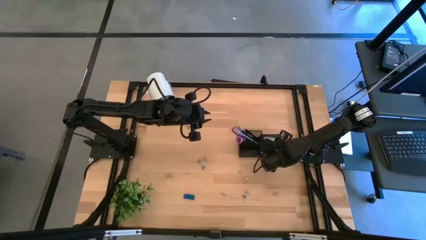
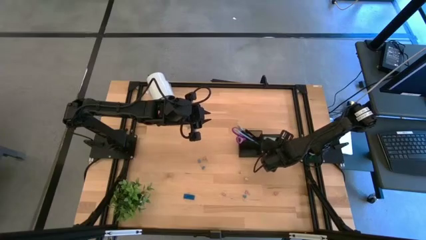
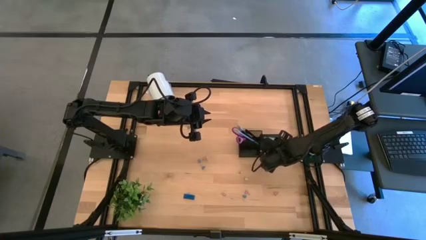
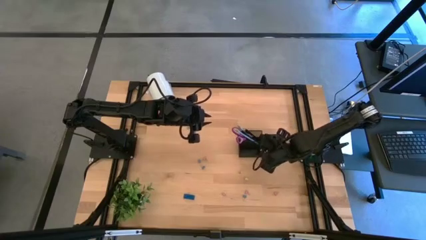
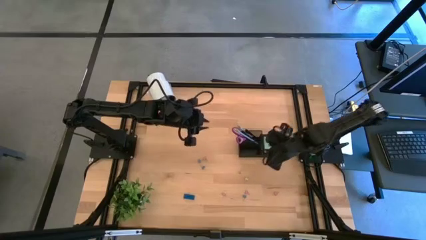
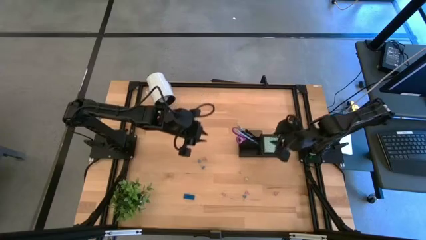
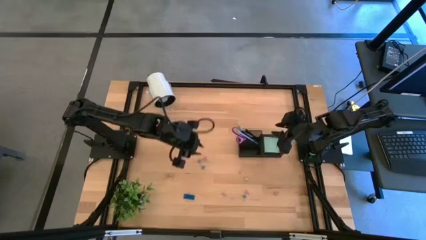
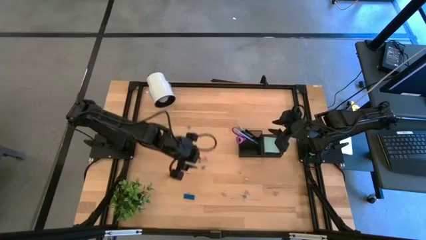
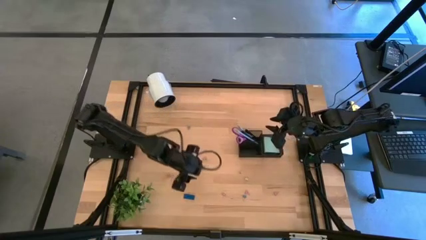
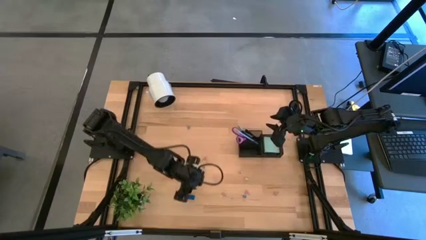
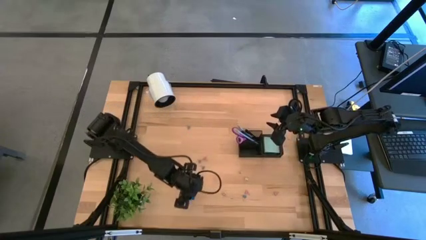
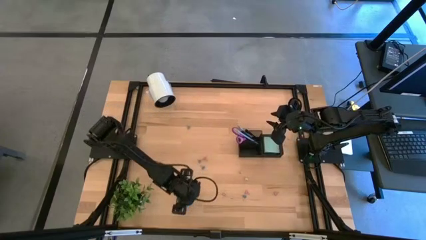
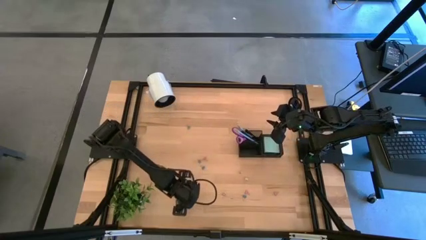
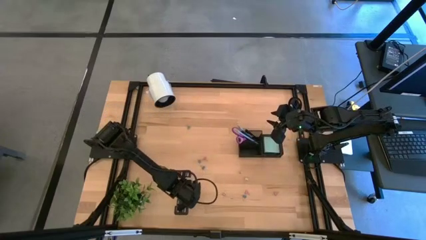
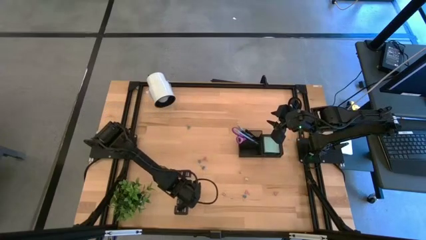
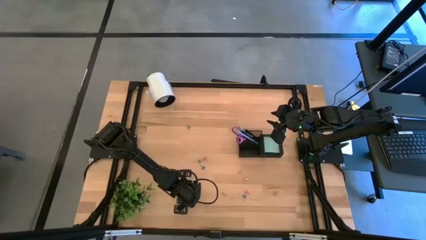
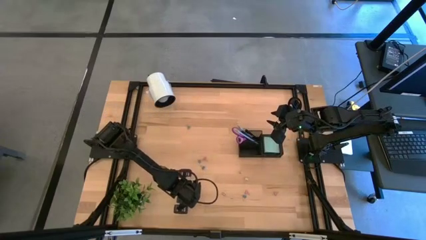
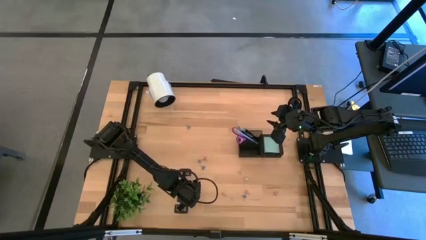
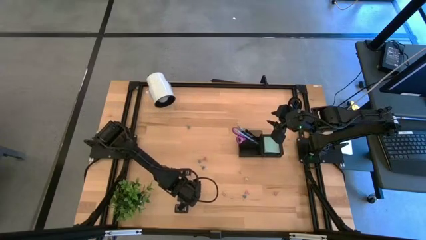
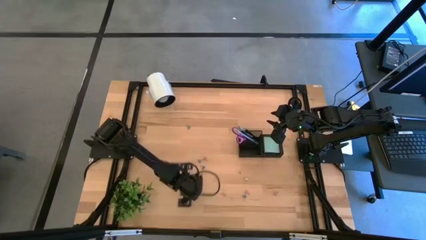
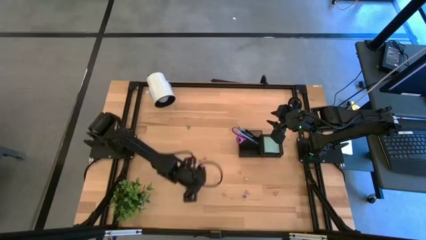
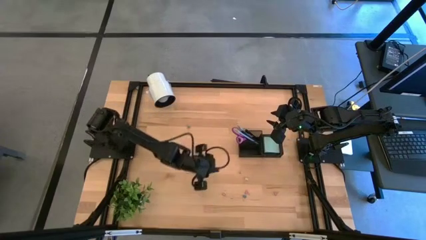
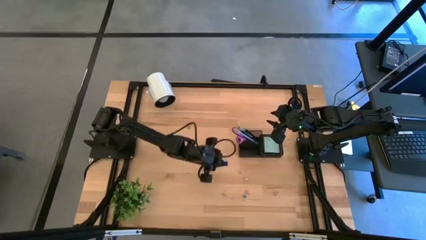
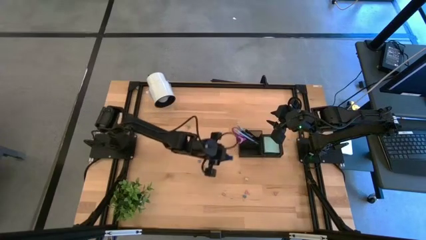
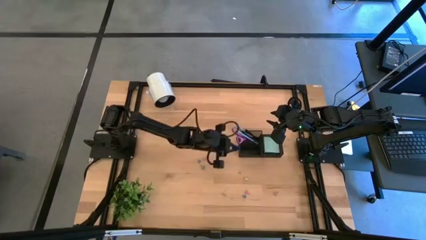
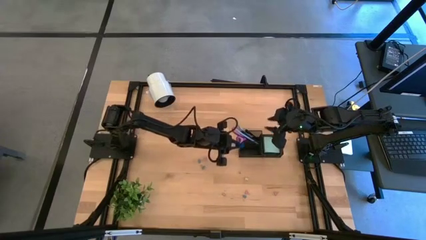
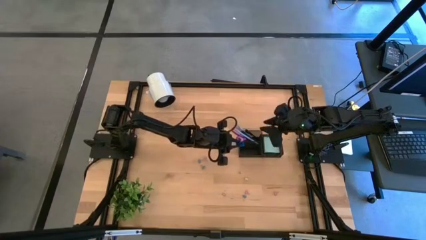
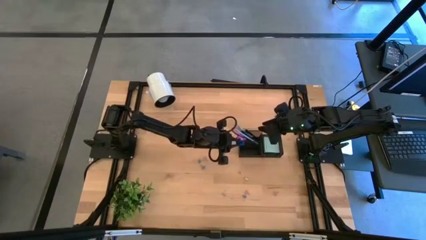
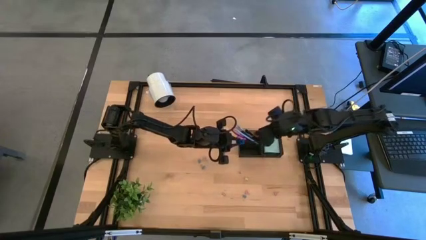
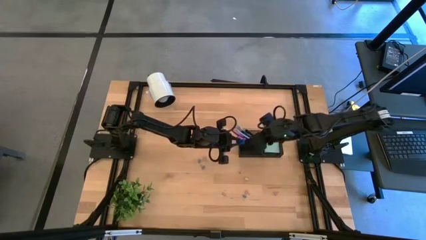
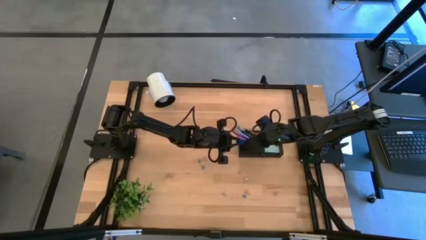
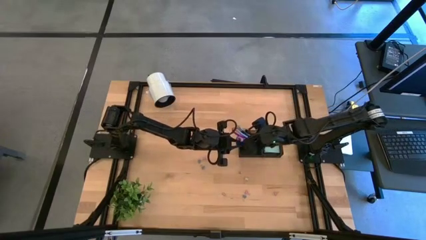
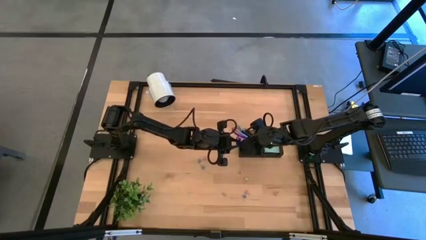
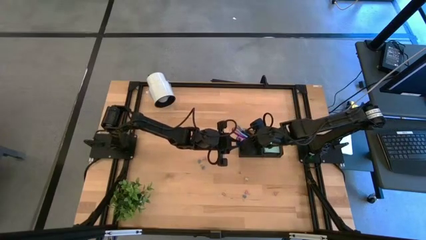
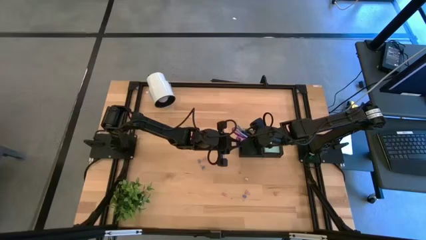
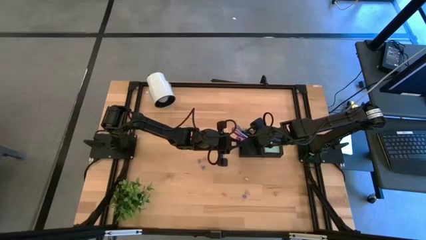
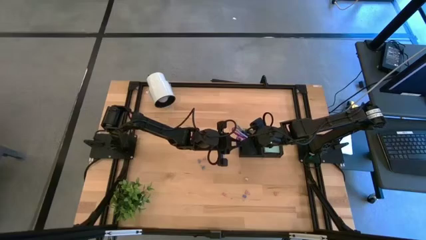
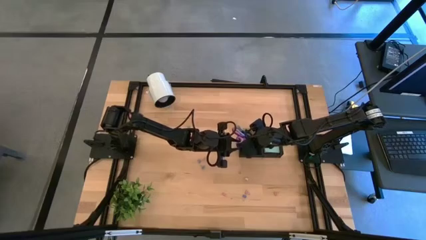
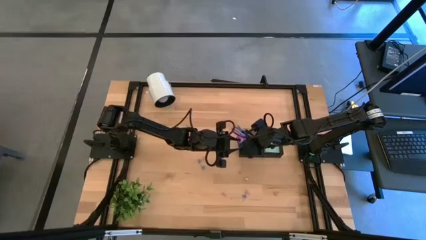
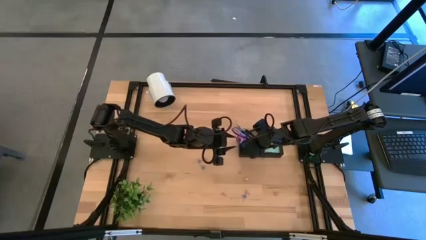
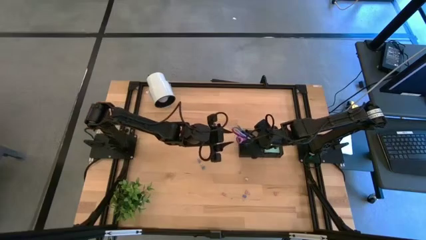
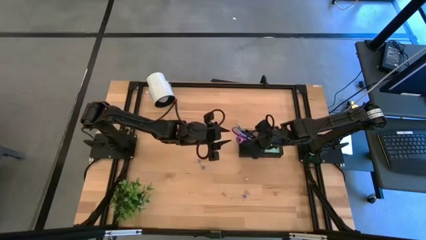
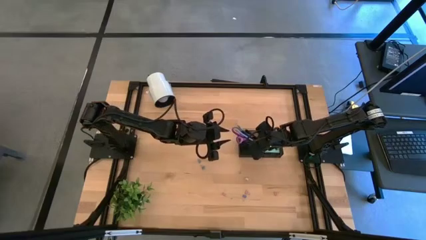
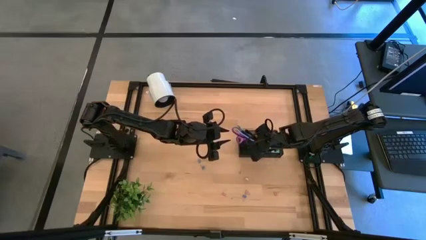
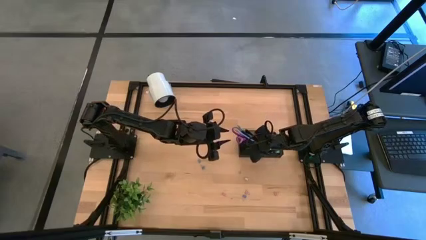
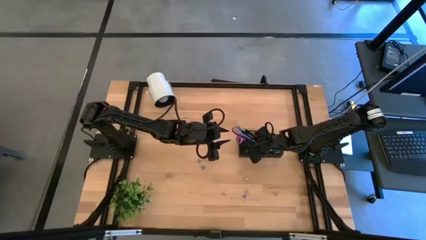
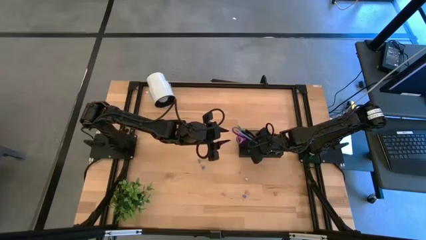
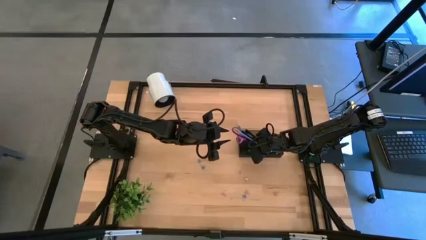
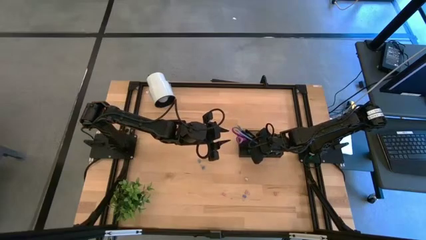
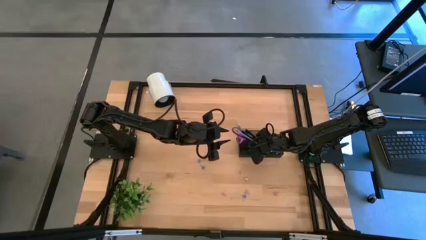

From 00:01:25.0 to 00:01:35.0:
Task: Pick and place office supplies into organizer
Put the blue eraser into the black desk organizer

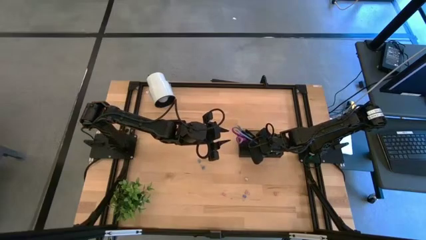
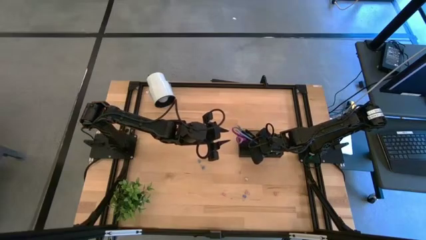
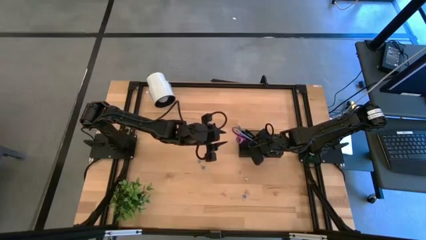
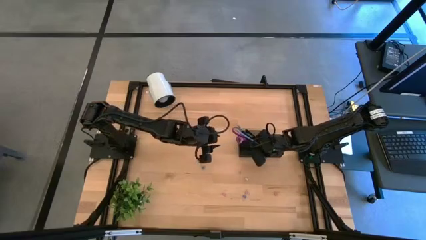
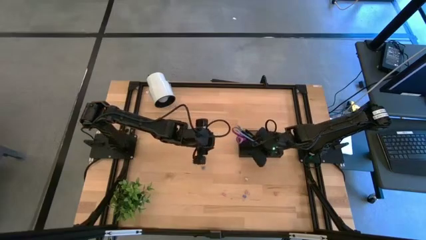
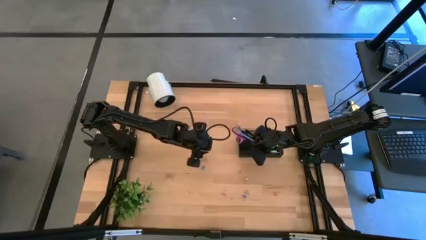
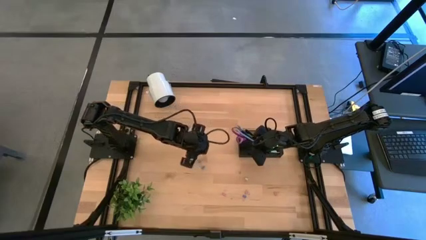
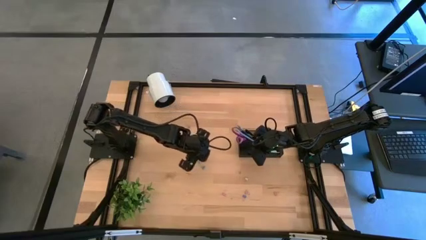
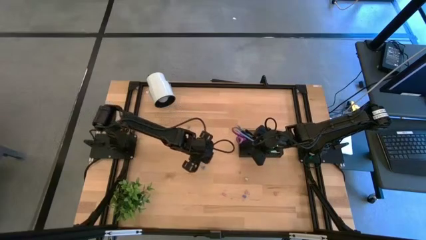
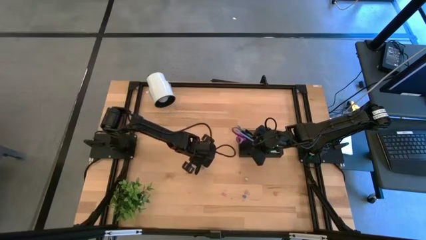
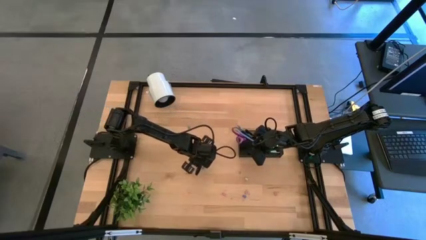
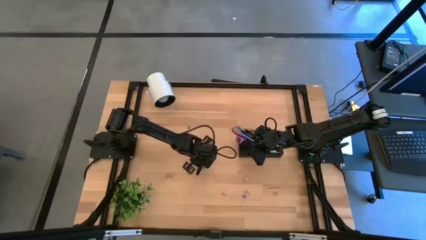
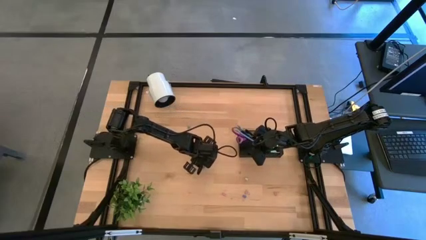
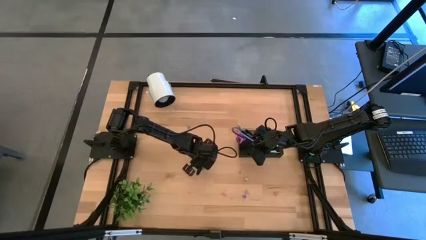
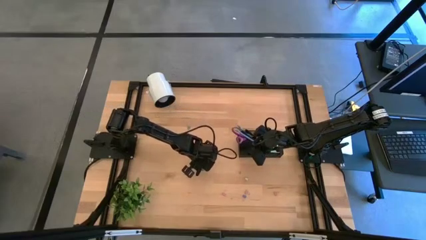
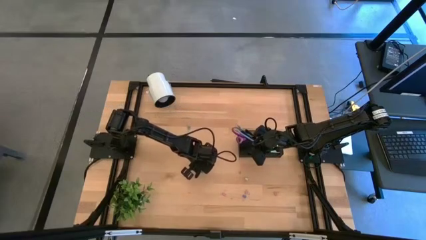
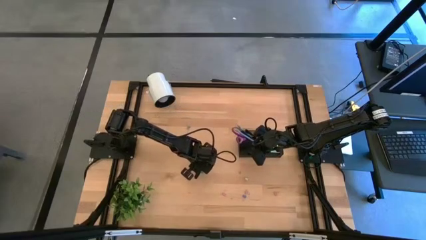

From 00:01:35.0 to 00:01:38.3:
Put the pink binder clip into the black desk organizer

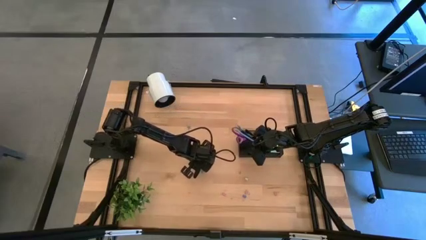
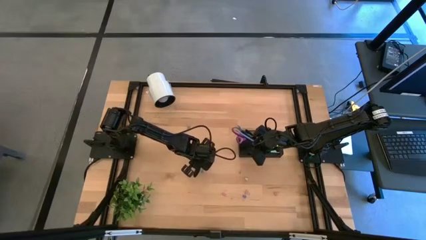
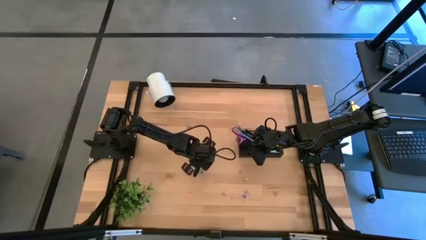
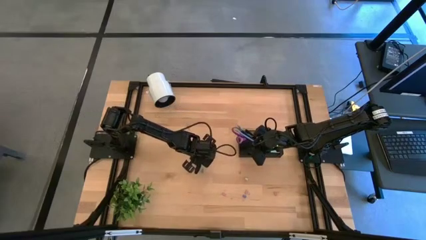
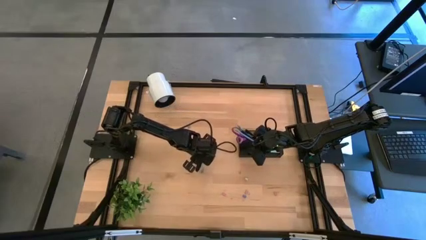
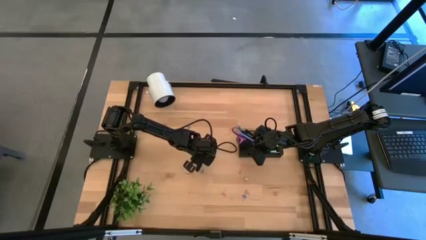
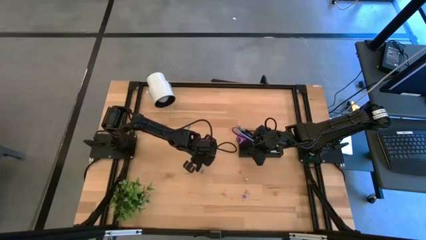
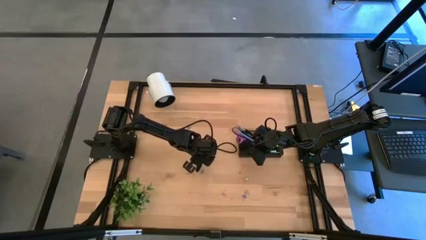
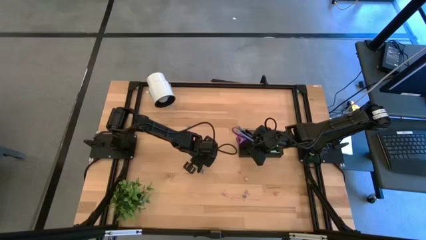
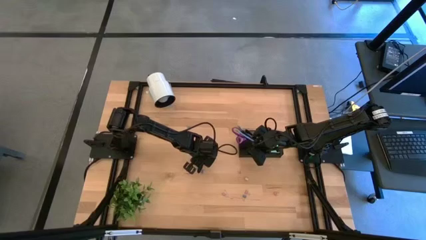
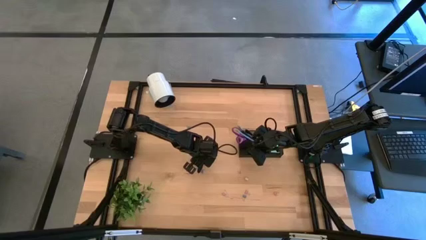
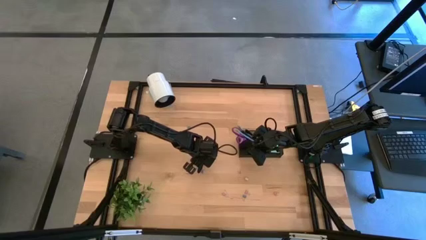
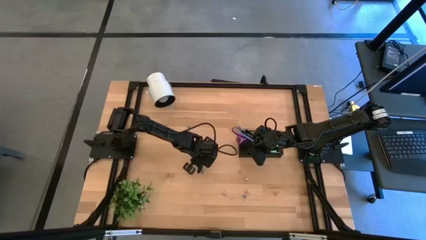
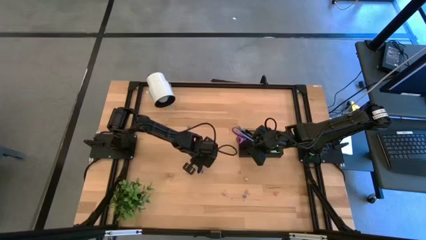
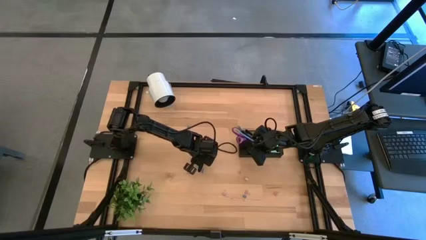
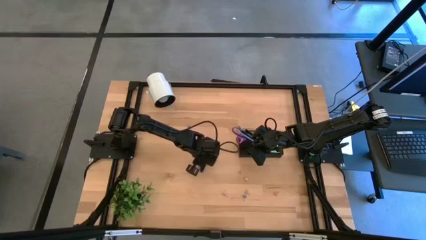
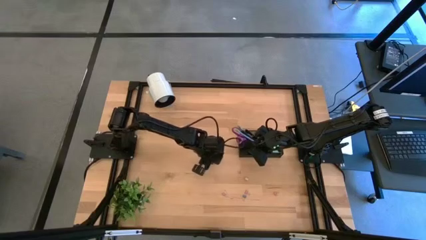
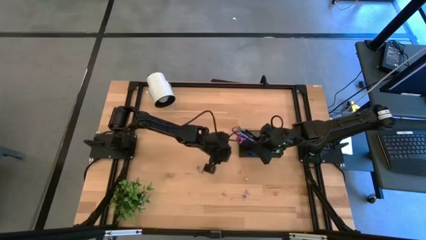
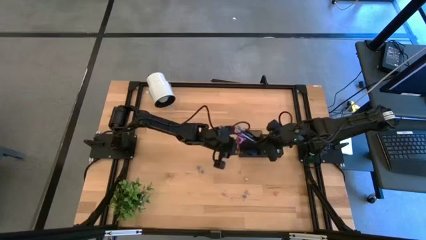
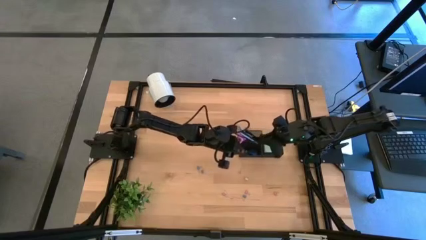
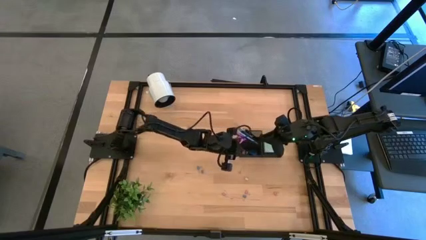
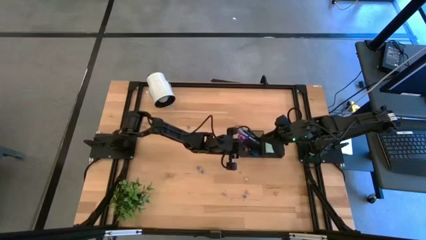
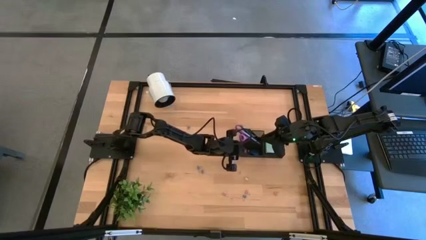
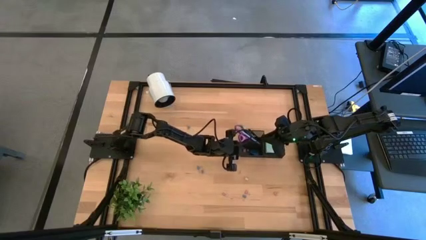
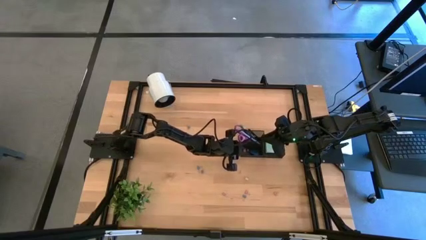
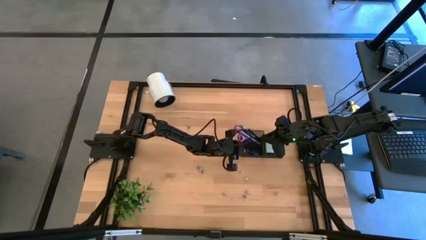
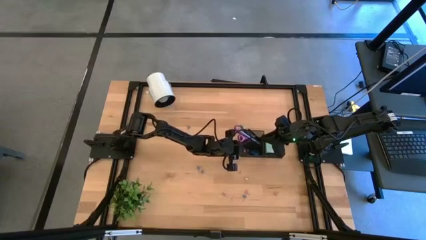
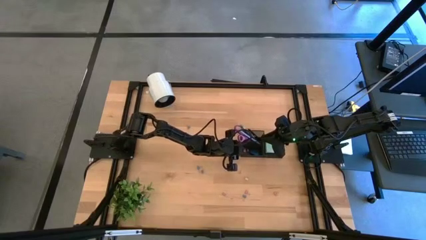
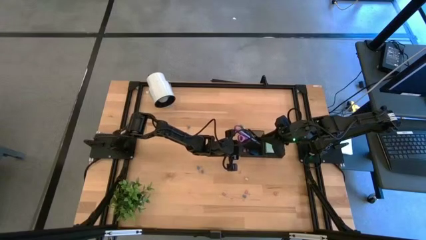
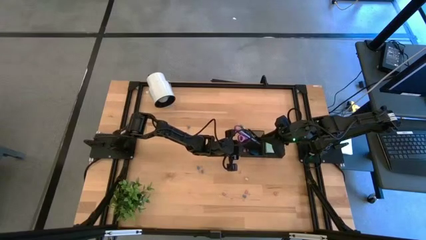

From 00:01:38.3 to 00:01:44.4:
Put the pink binder clip into the black desk organizer
